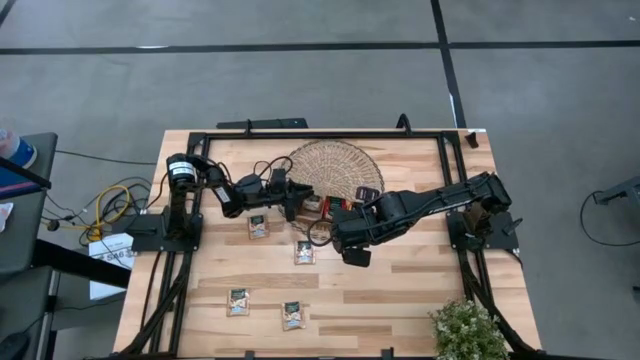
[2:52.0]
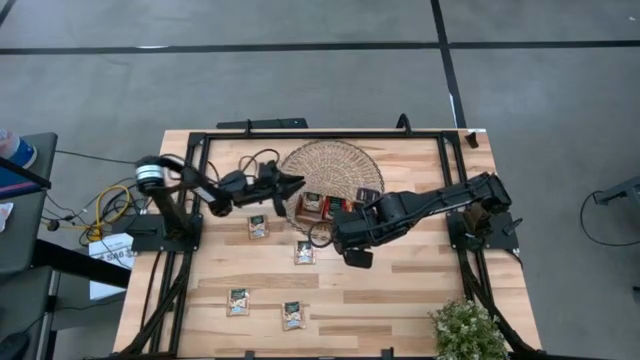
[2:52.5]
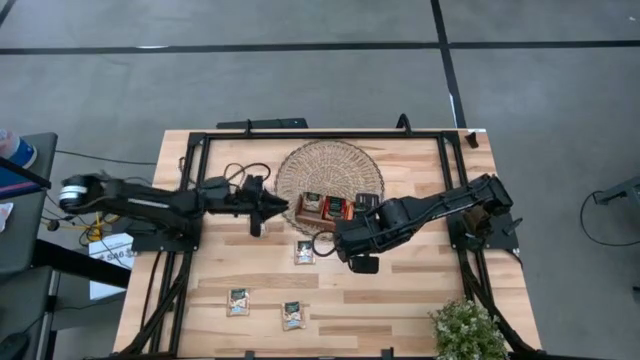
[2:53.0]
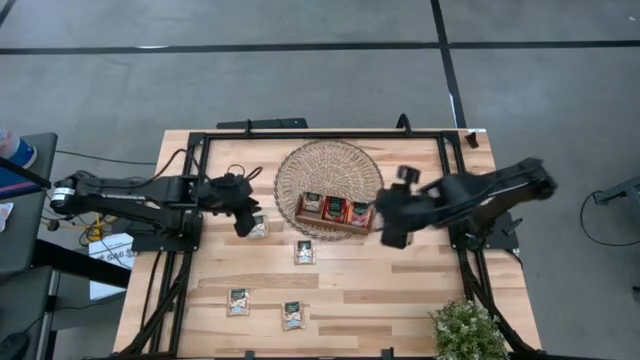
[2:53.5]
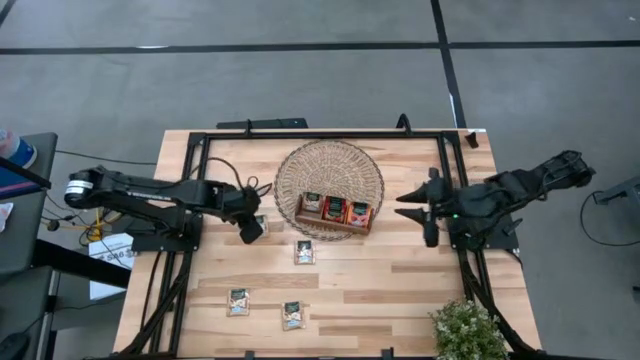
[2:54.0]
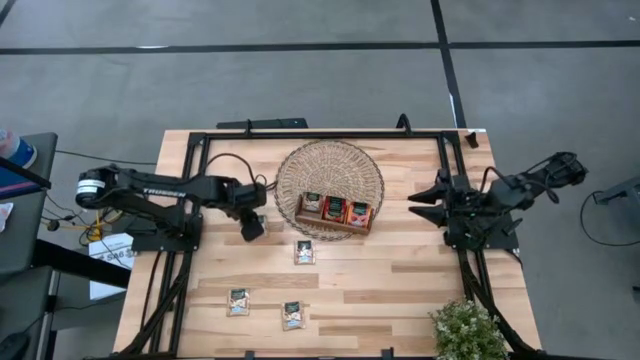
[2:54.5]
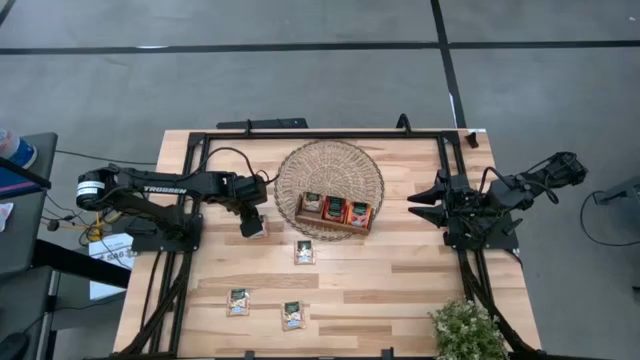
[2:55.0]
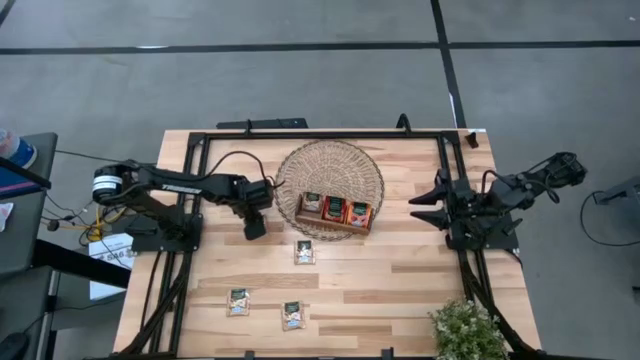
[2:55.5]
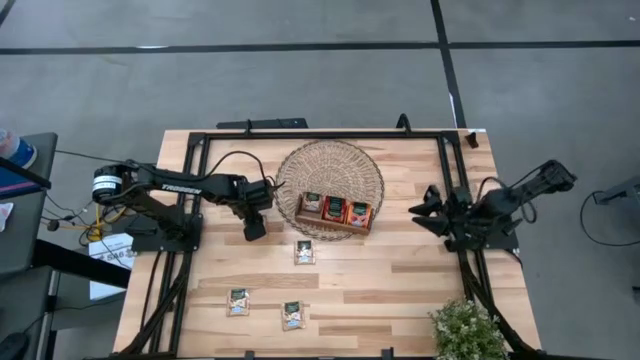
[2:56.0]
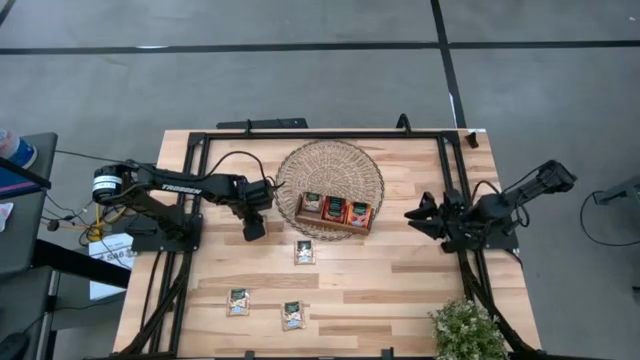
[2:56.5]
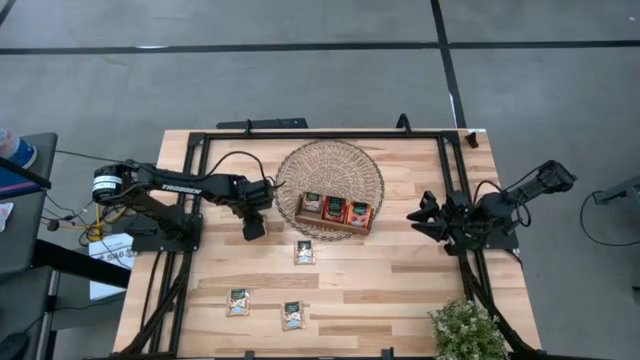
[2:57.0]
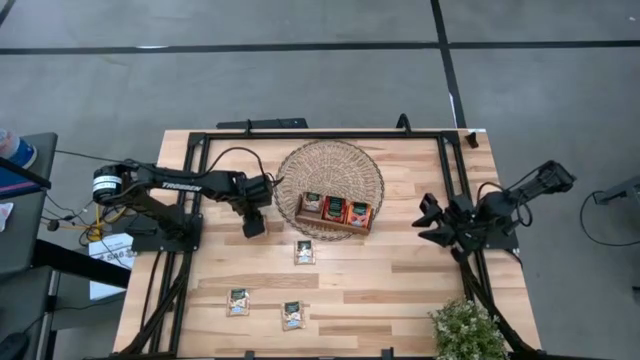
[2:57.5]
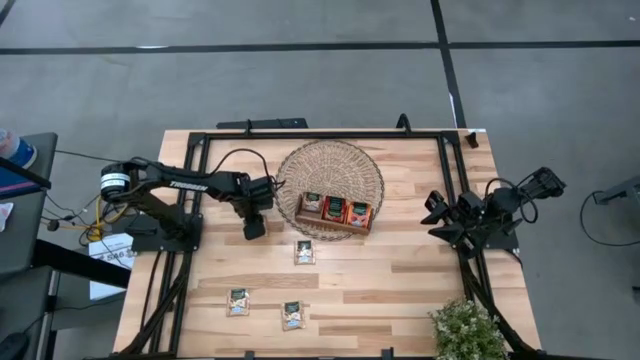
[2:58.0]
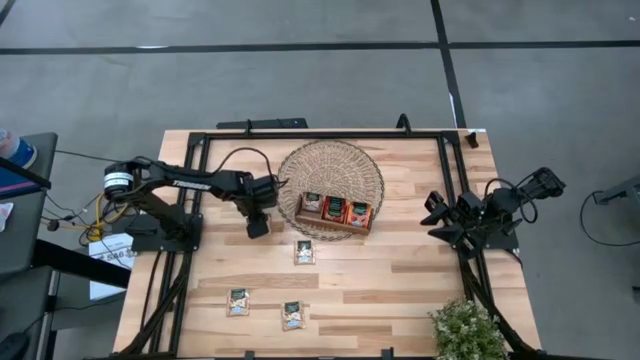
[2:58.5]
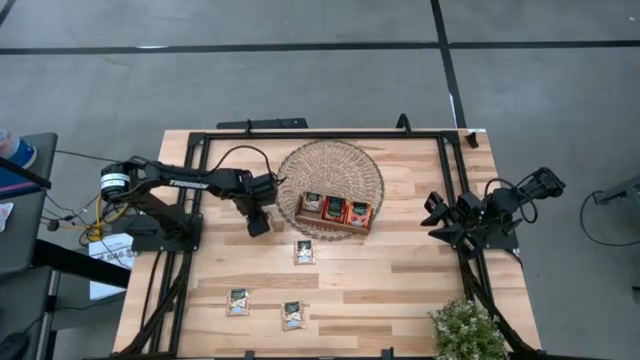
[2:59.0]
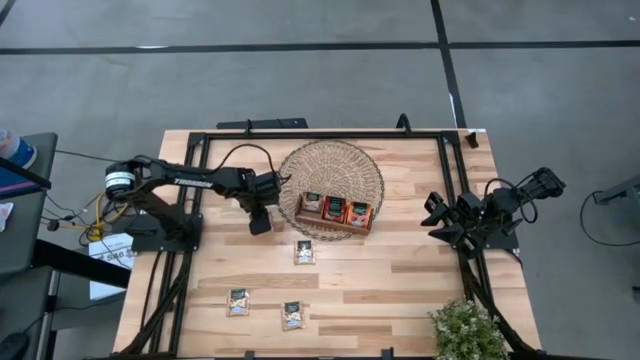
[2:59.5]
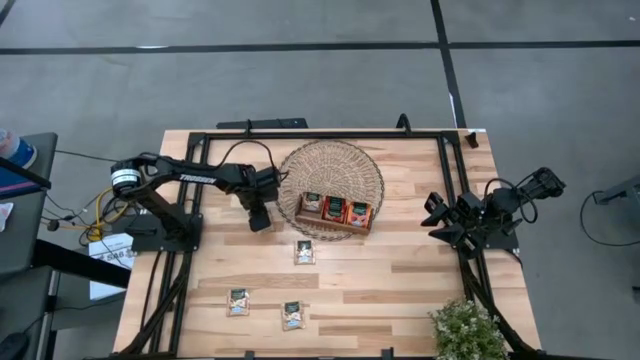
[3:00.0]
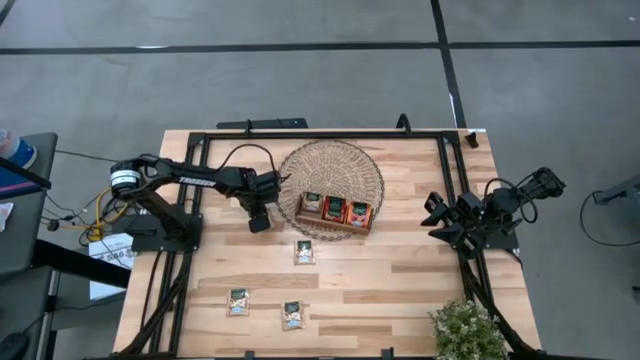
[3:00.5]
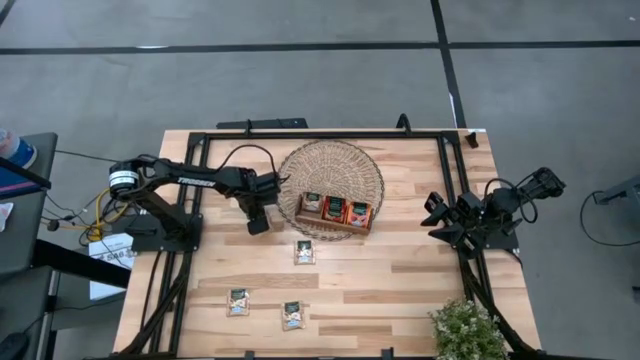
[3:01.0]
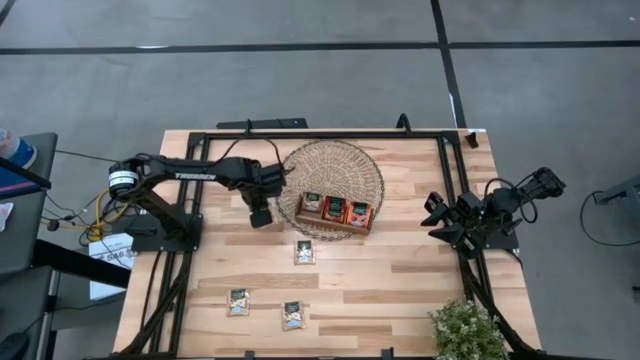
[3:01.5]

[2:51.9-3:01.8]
Task: Pick & Place Tea
Put the brown tea bag into the left section of the wooden organizer

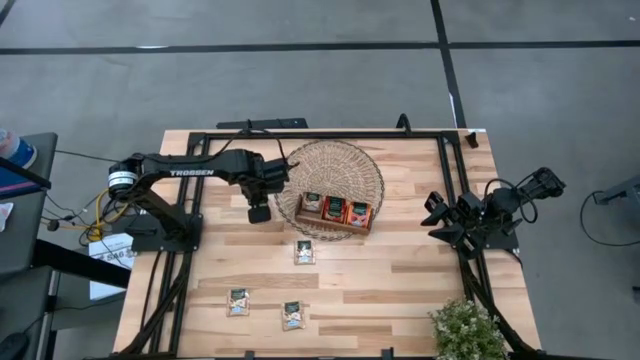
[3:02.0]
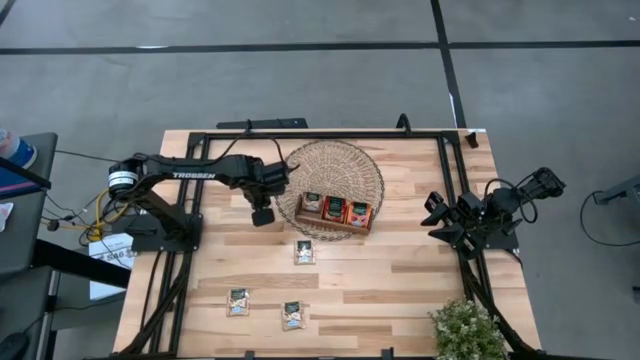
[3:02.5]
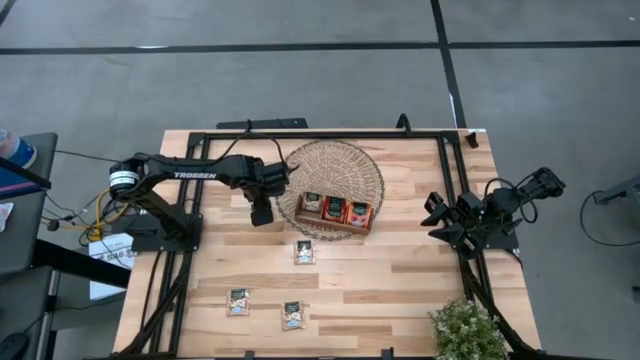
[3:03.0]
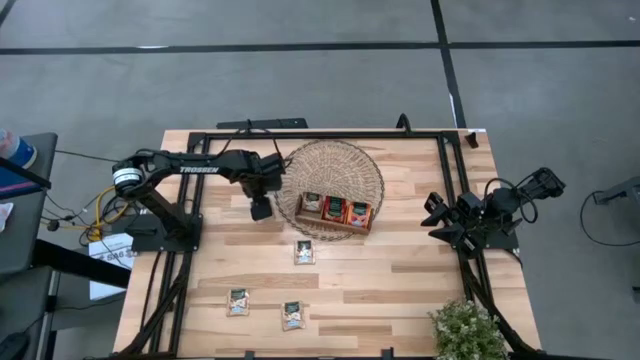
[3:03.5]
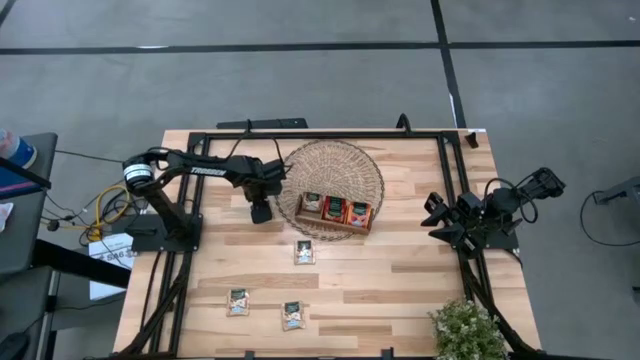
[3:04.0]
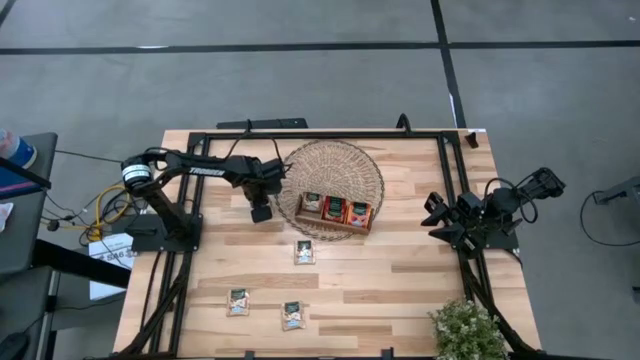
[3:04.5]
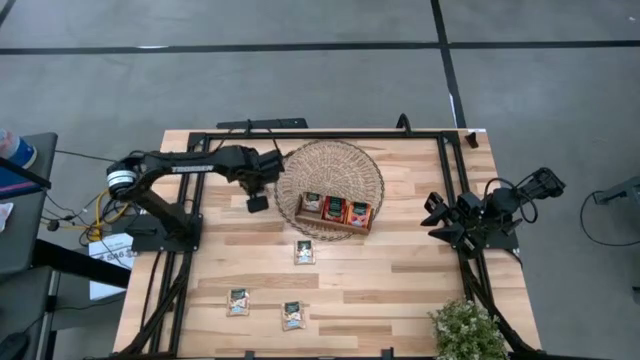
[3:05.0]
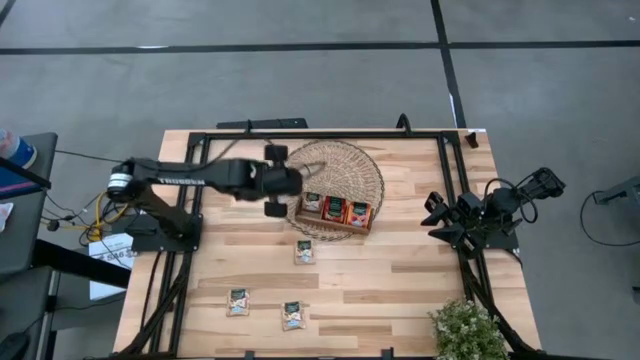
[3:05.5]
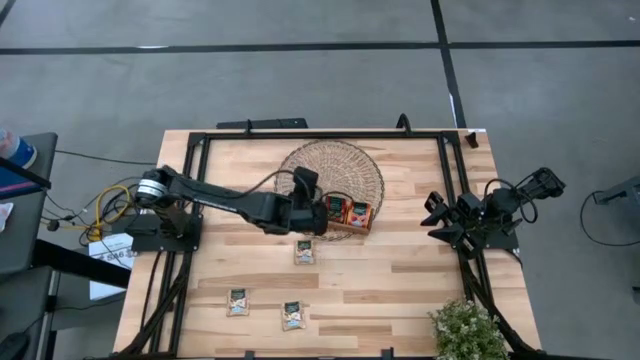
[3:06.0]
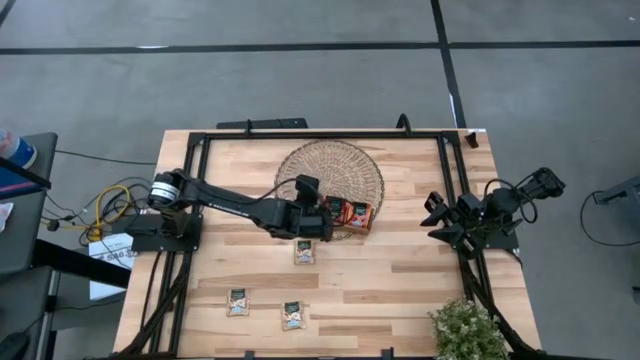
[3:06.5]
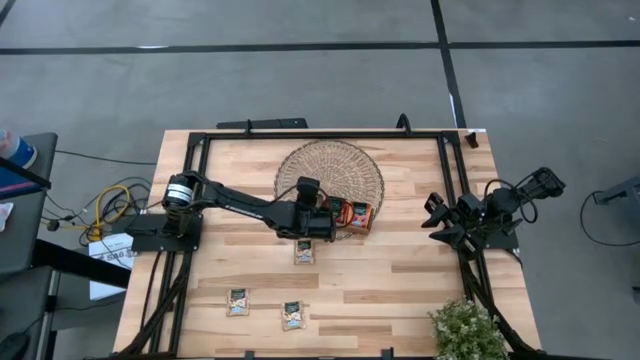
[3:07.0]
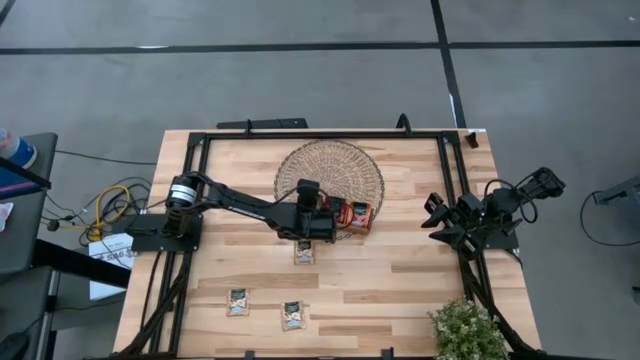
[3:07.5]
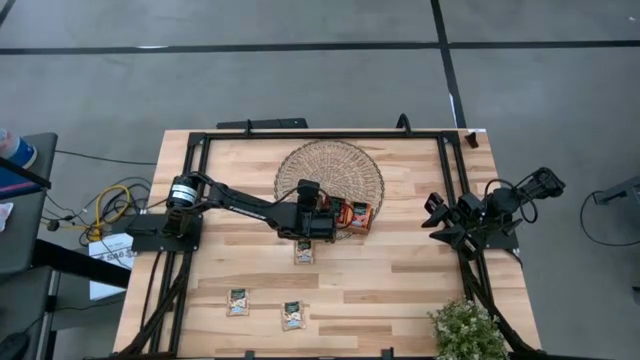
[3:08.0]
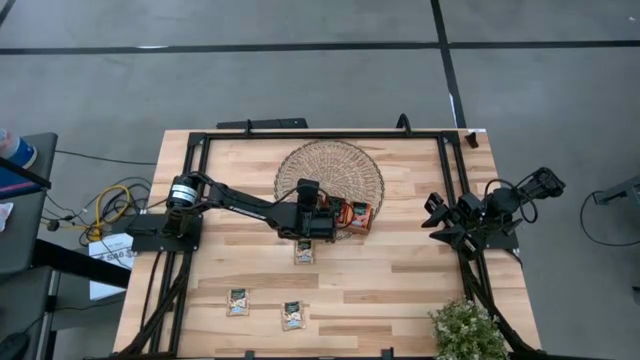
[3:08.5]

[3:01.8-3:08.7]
Put the brown tea bag into the left section of the wooden organizer
